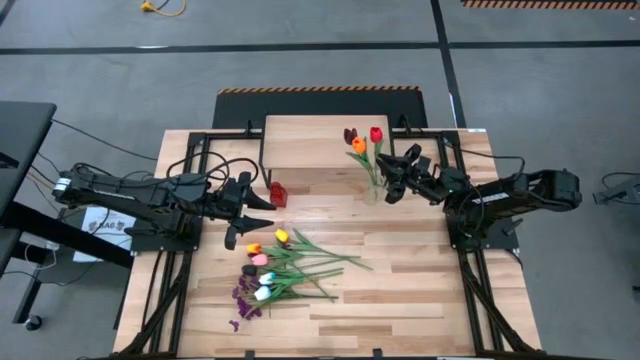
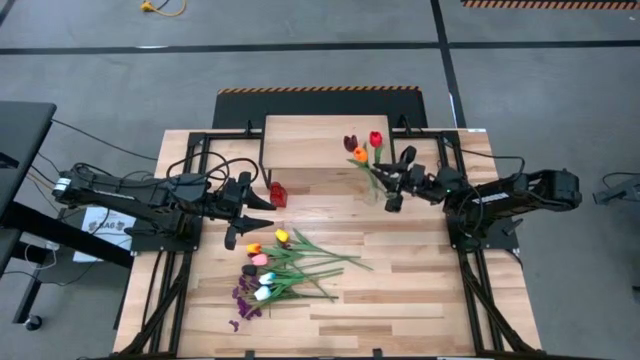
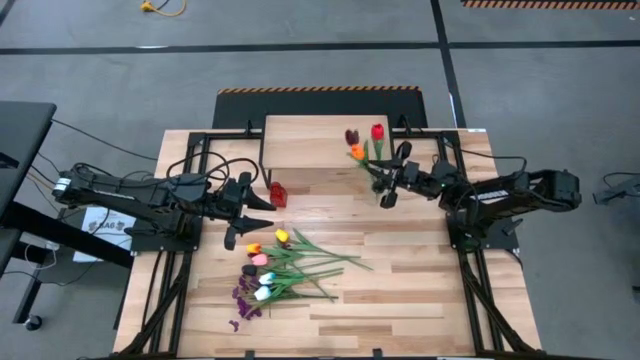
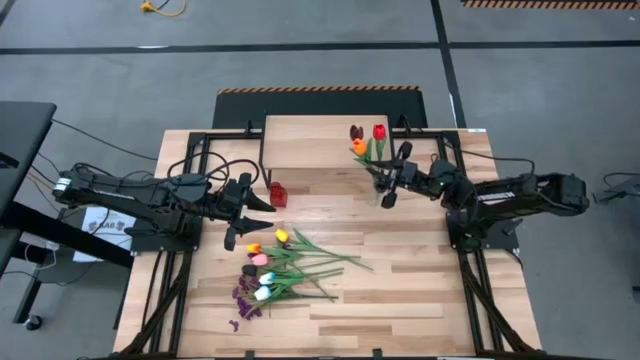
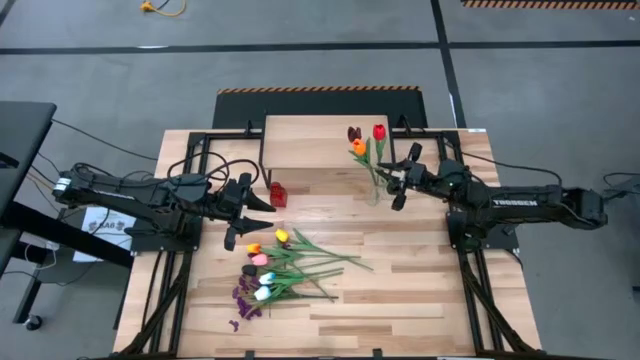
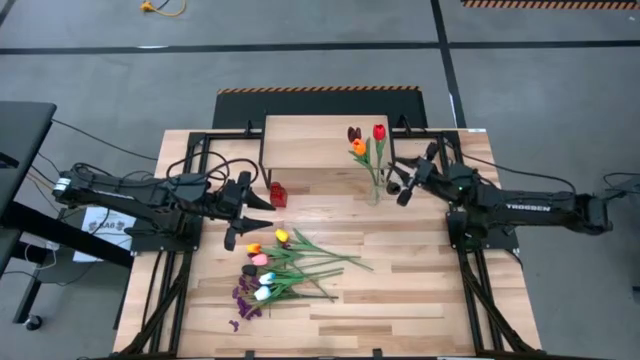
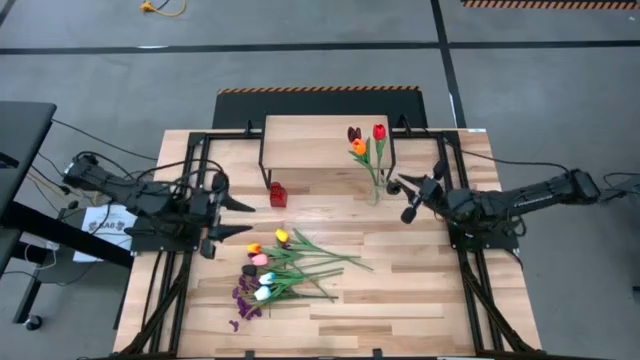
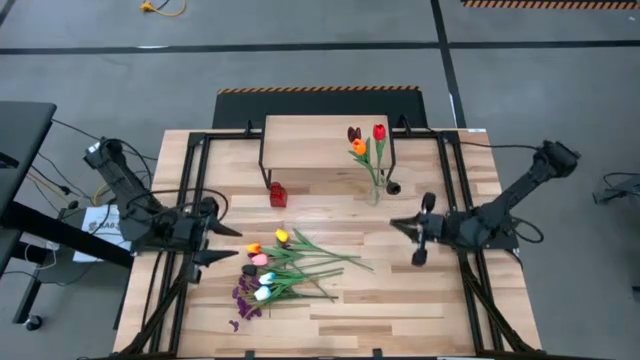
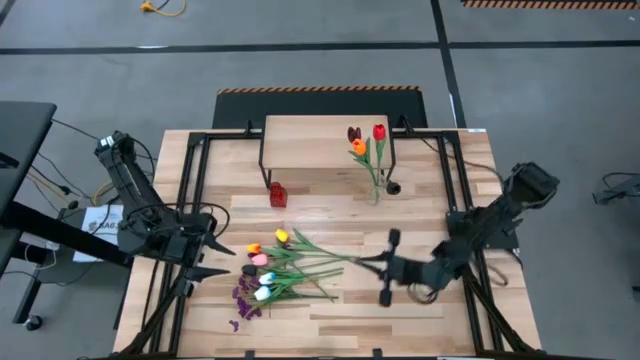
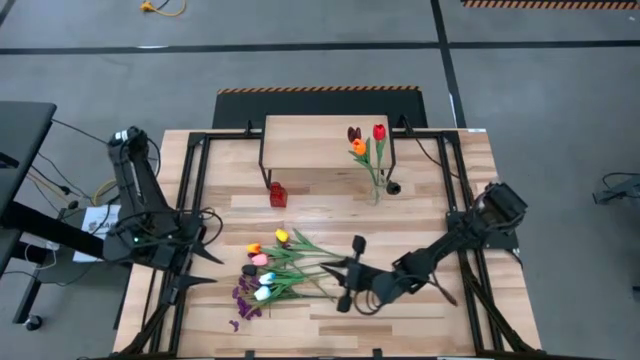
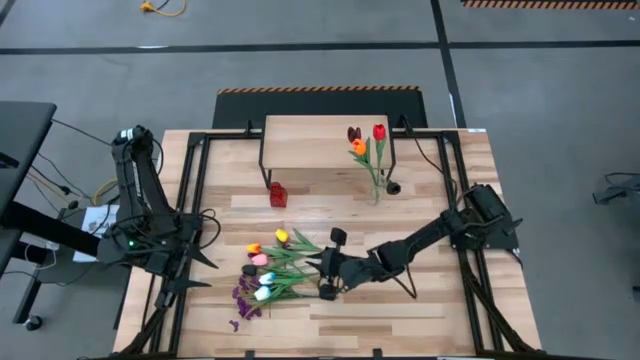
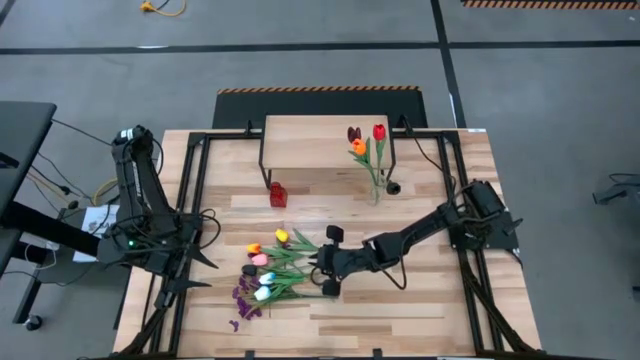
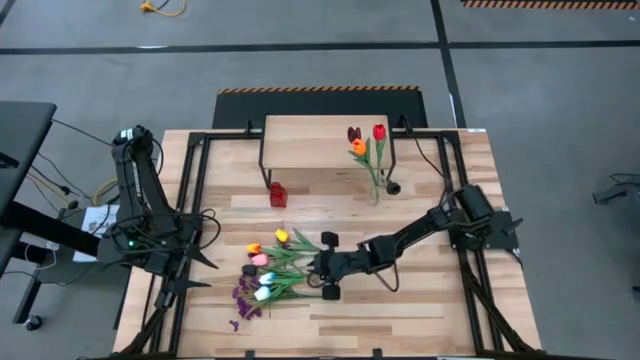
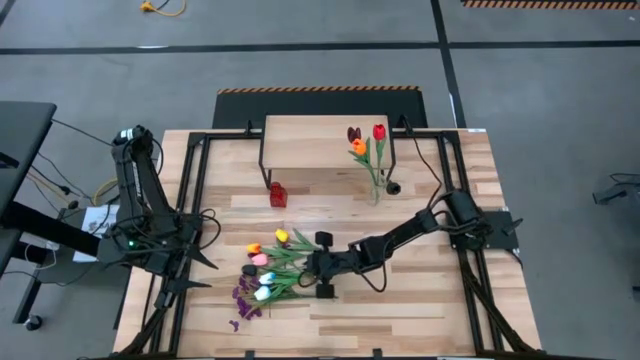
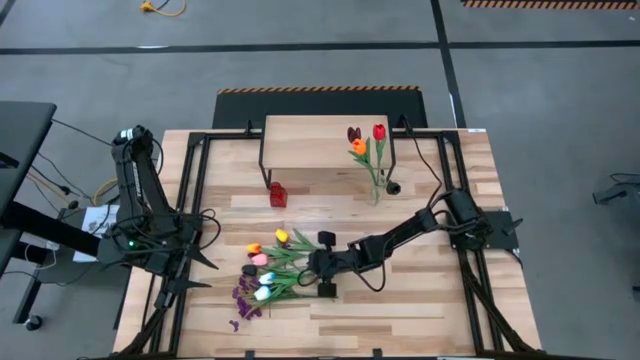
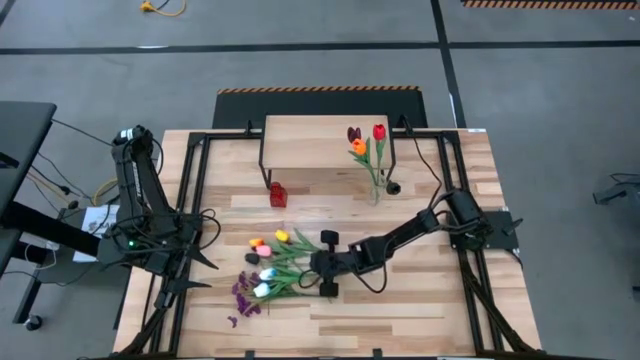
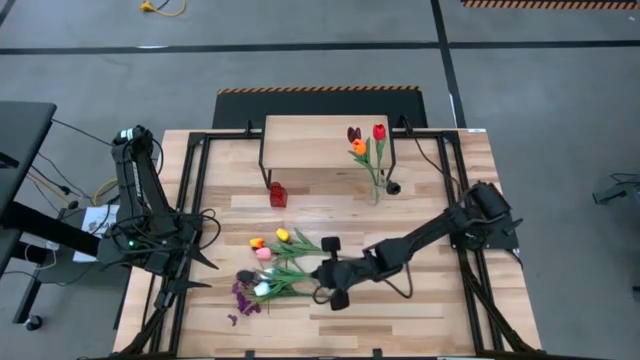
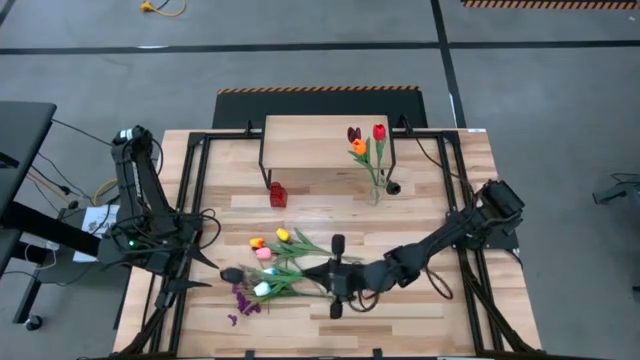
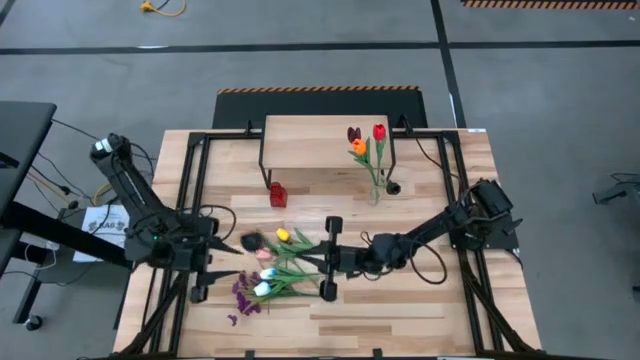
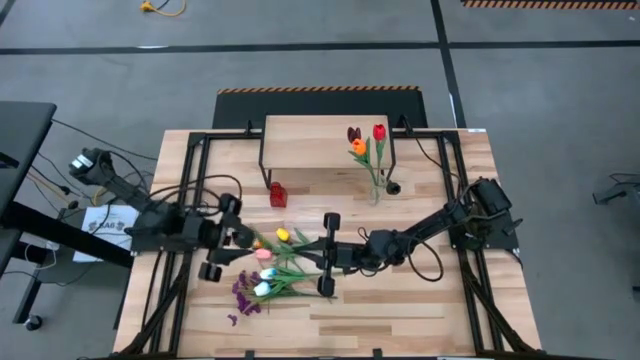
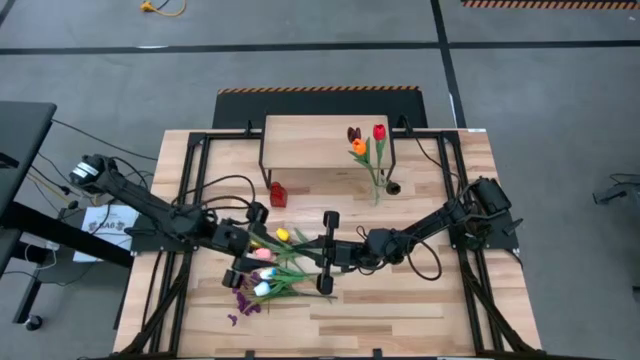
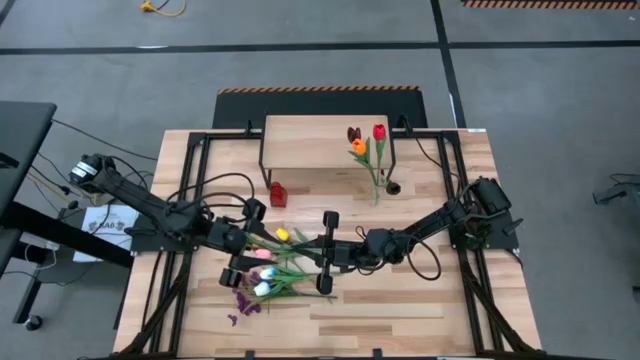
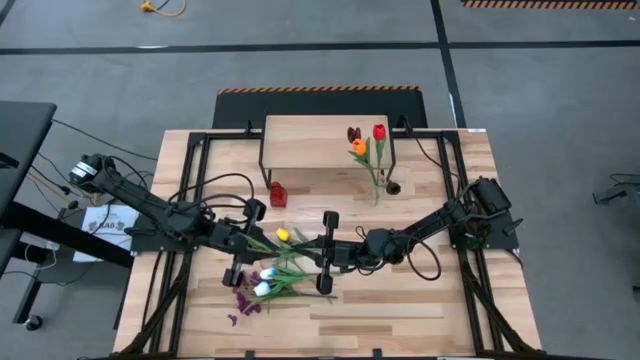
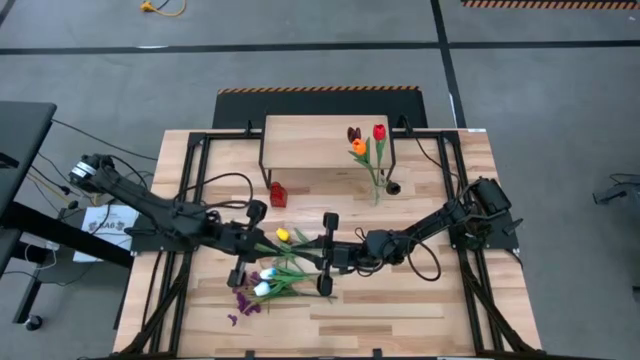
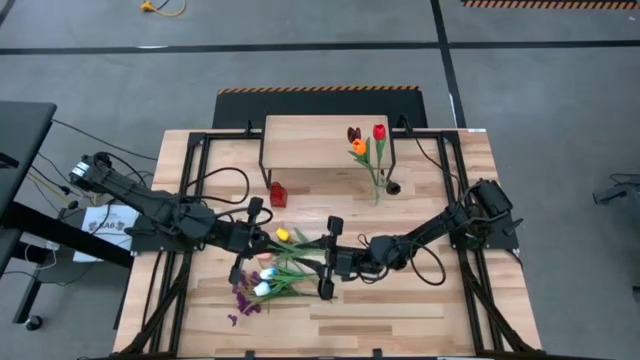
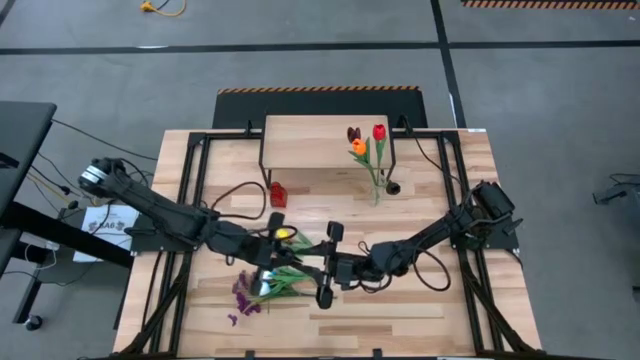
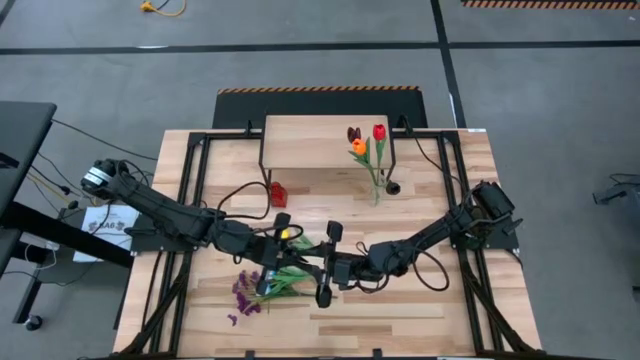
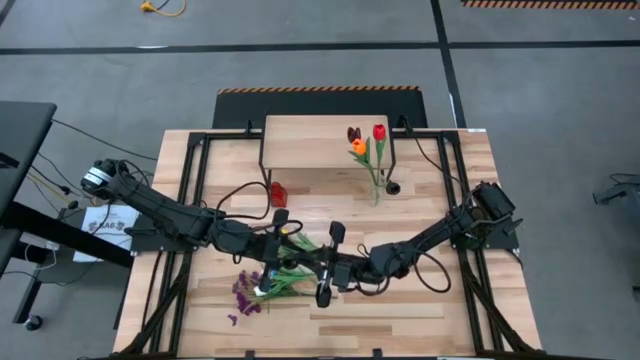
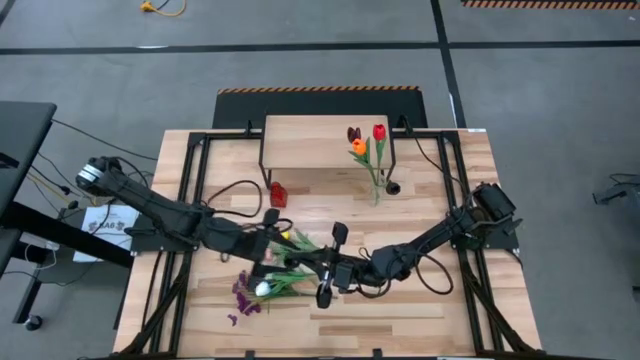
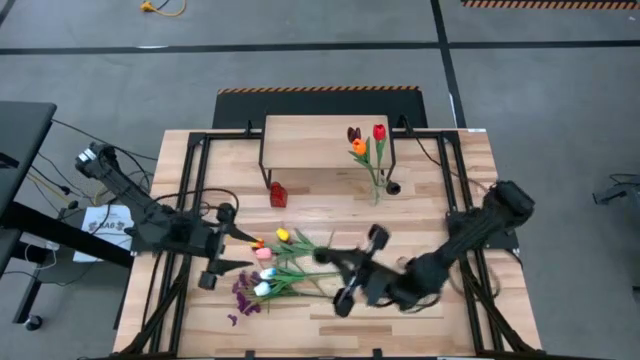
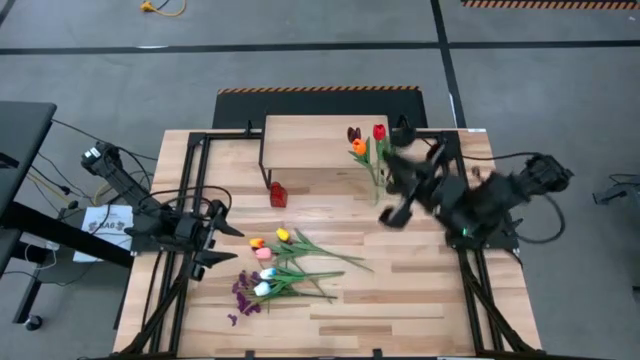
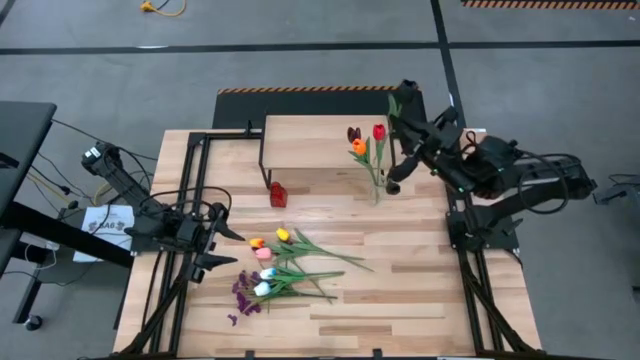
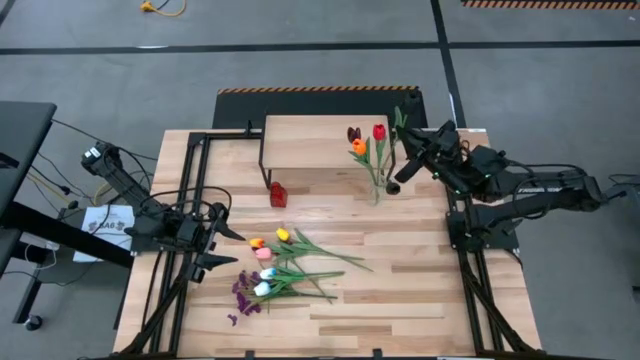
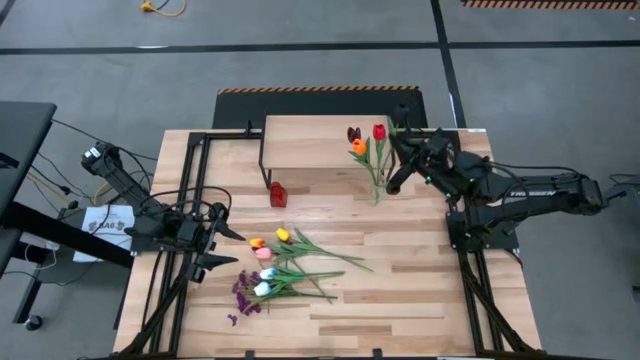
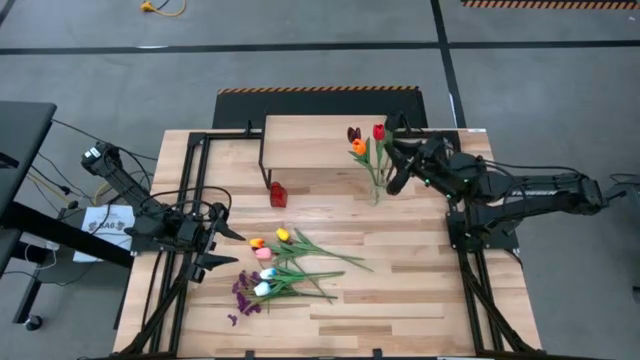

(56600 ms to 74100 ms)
Task: Pick and place flowers into a vace then onto a shelf
Put the black flower into the transparent vase

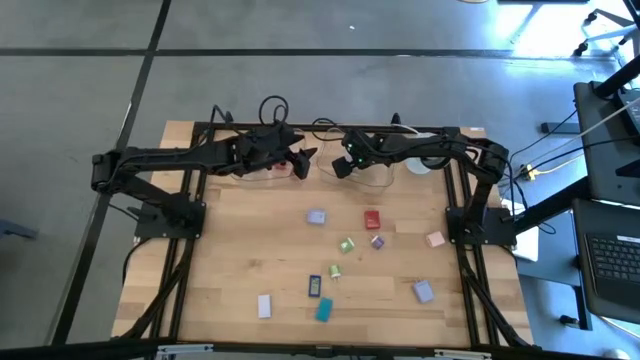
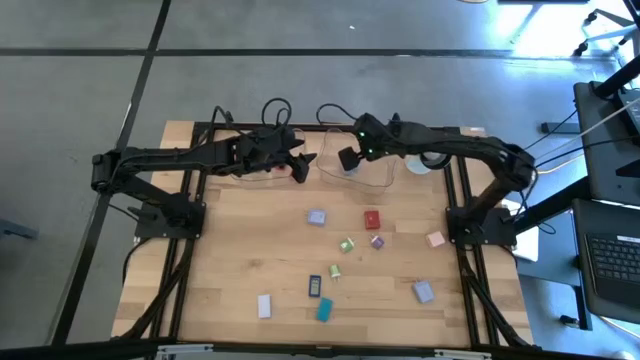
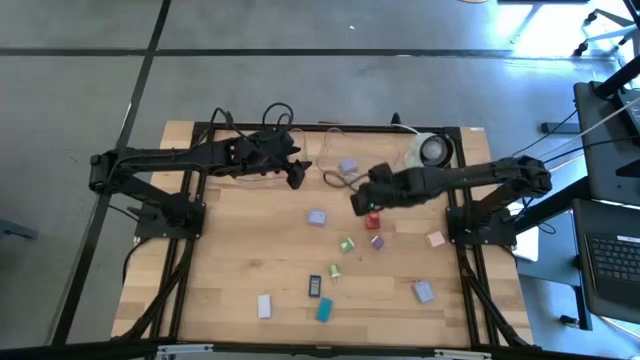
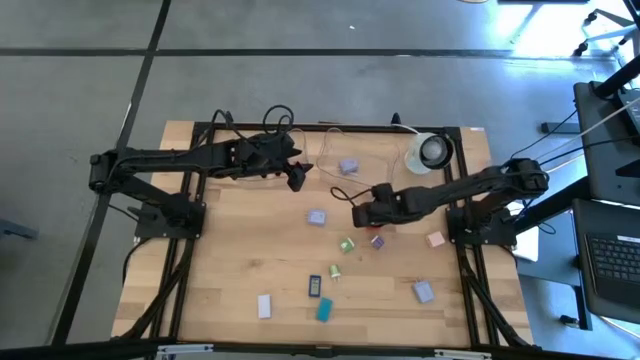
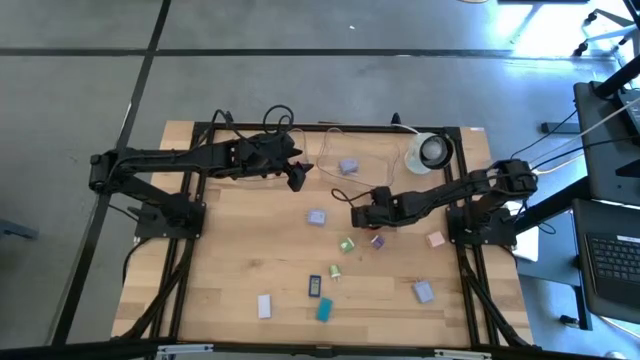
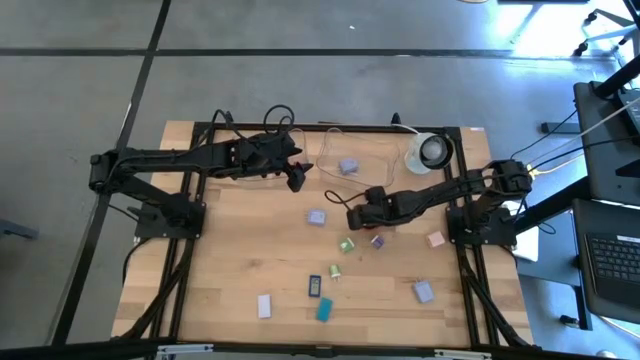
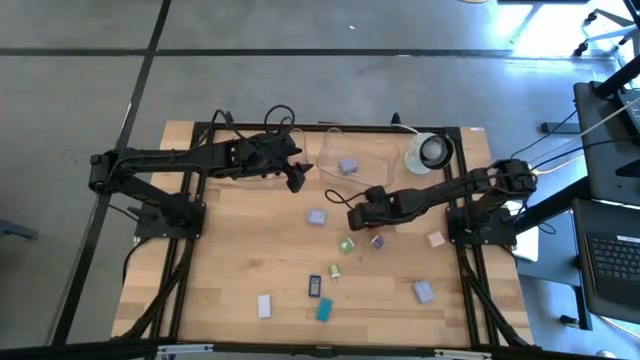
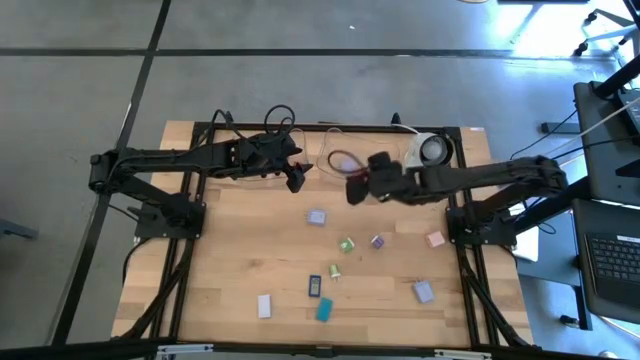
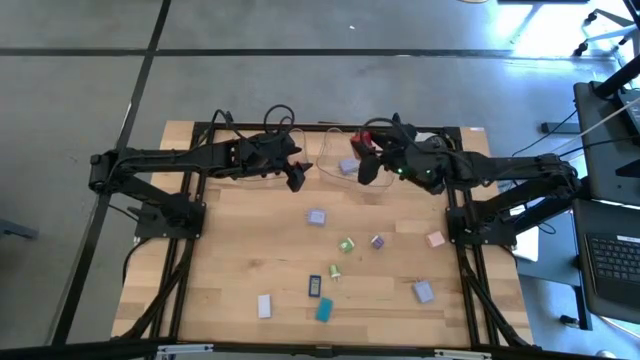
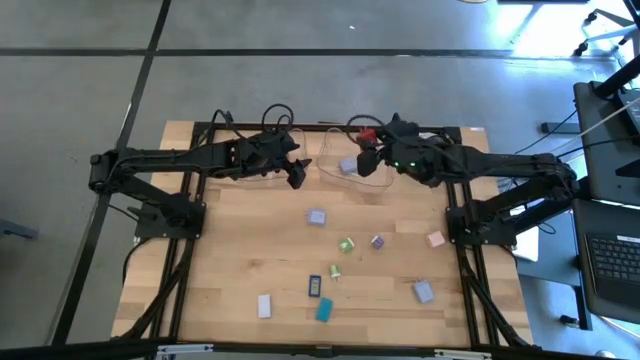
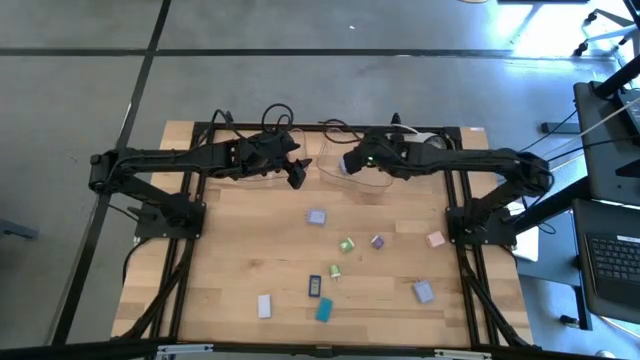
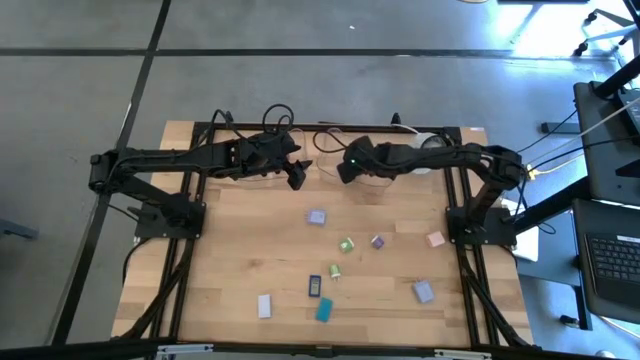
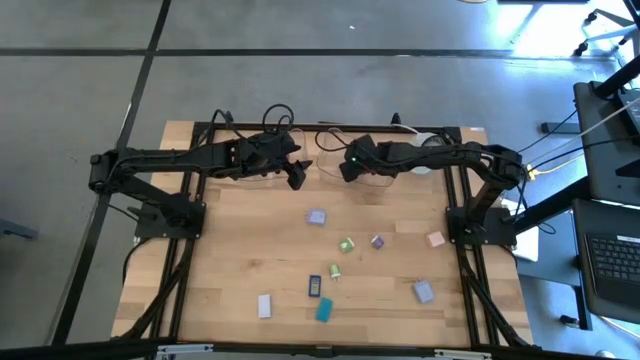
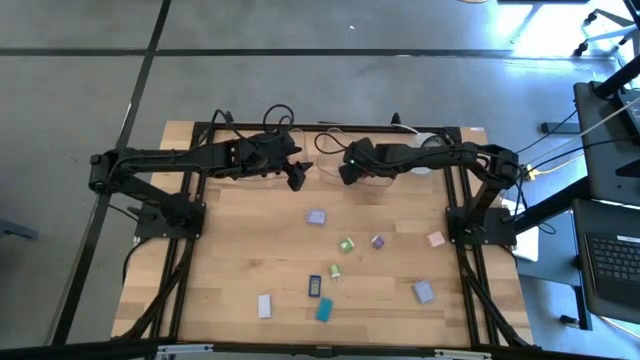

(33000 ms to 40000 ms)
Task: Pick & Place Office items
Put the red charger adapter into the right transparent bin
